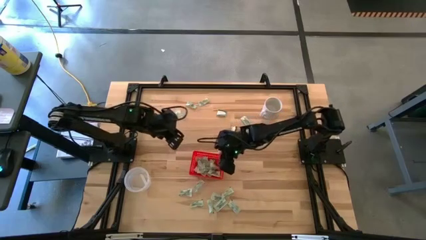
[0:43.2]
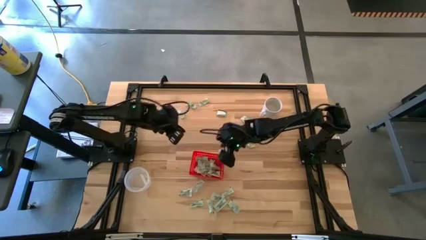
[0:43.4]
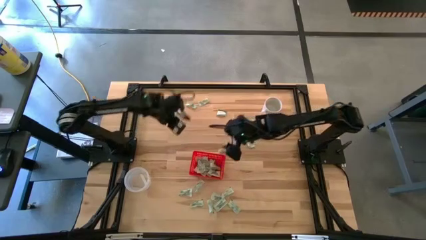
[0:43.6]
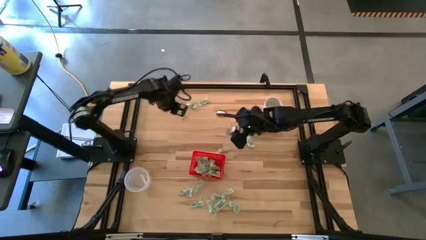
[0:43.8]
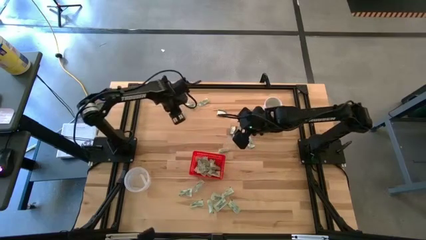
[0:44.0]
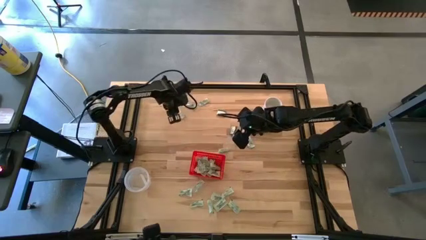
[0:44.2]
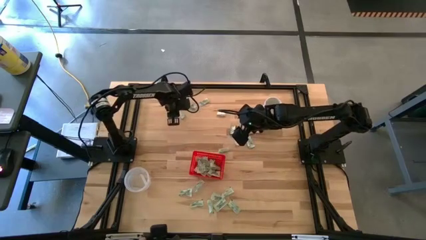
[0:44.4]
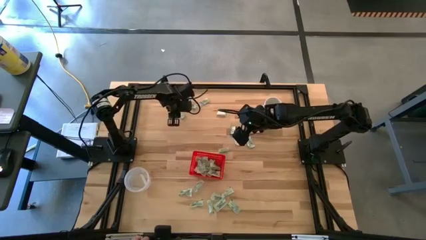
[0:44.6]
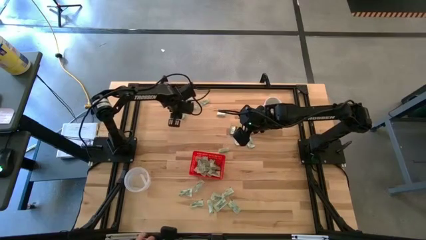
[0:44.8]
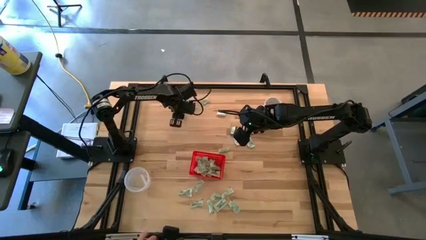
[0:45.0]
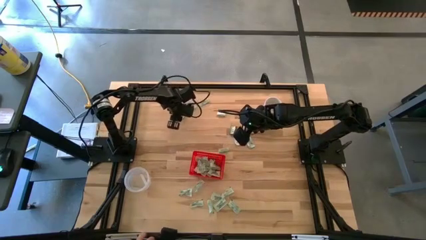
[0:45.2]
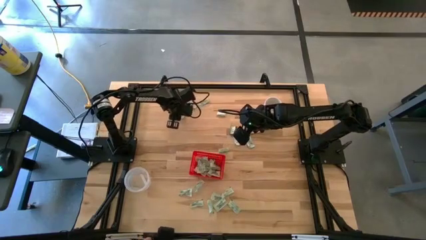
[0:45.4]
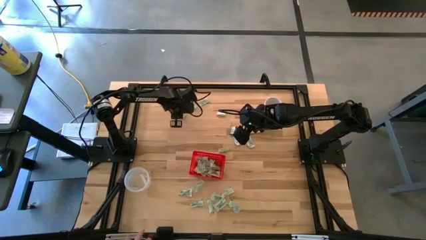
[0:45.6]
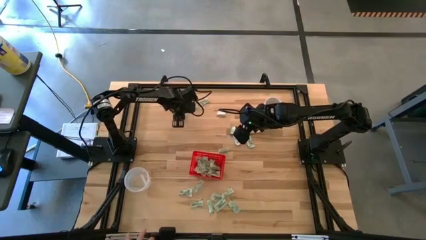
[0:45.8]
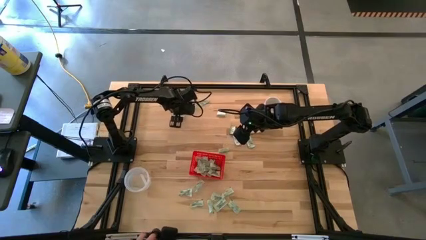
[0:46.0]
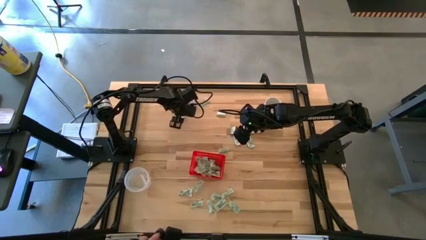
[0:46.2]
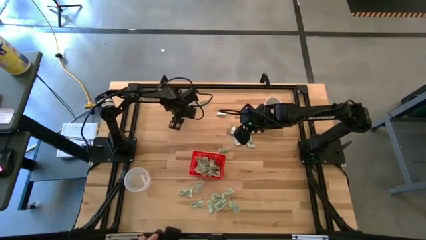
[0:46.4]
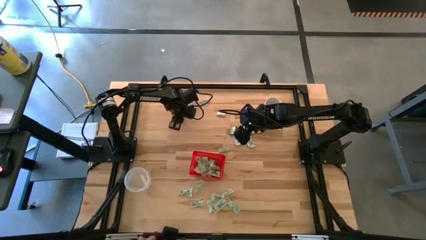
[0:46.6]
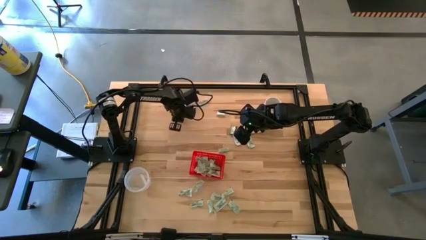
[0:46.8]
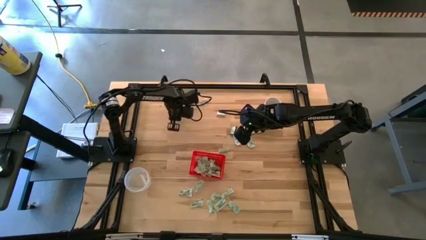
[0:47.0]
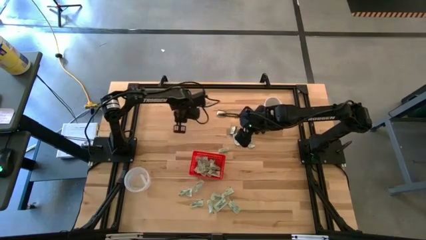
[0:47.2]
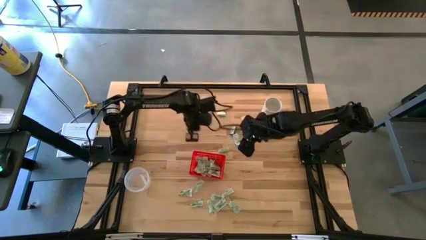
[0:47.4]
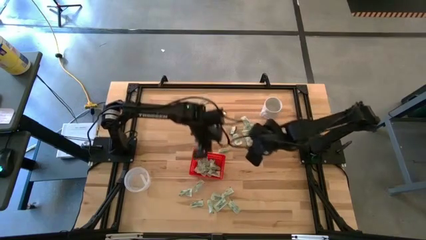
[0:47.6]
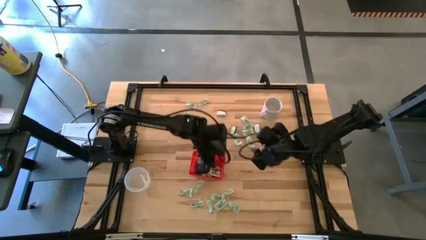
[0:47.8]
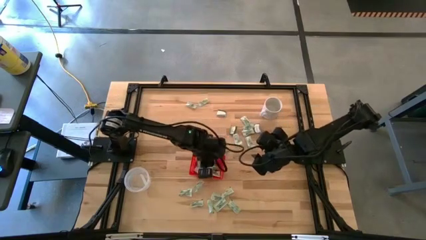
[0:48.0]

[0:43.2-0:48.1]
Task: Pick and place Stevia / Truvia into bins
Put the green stevia packet into the red basket

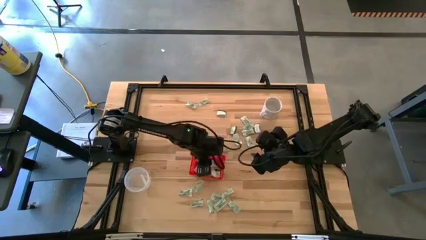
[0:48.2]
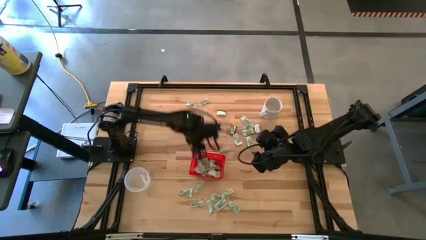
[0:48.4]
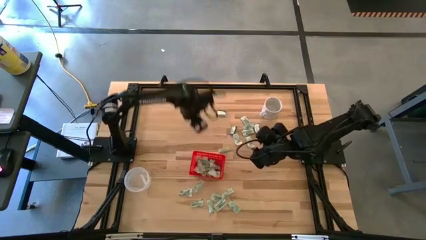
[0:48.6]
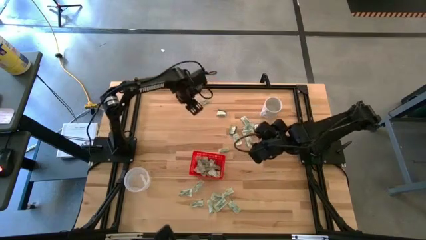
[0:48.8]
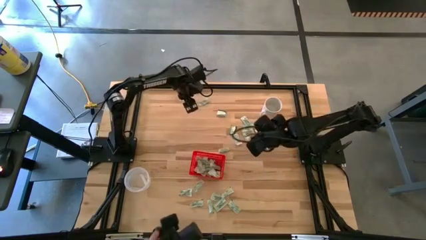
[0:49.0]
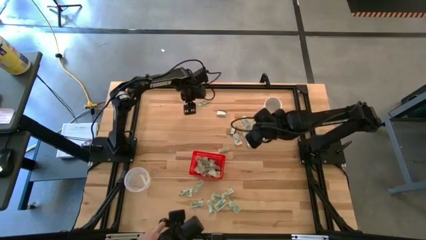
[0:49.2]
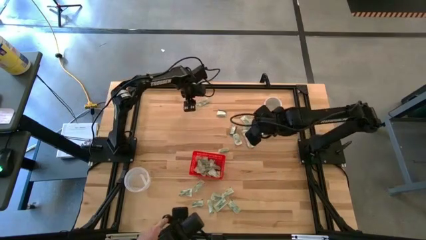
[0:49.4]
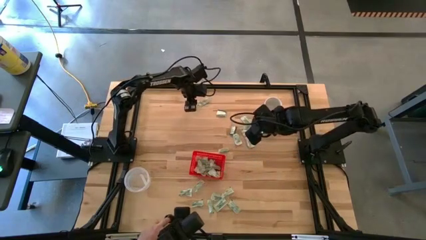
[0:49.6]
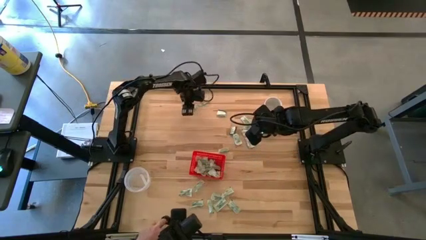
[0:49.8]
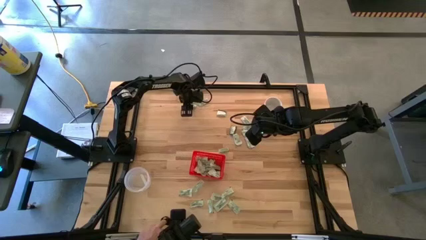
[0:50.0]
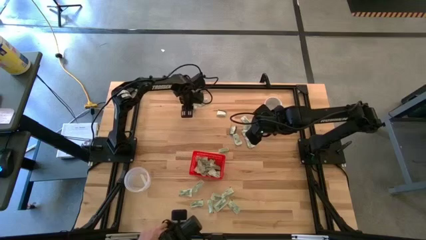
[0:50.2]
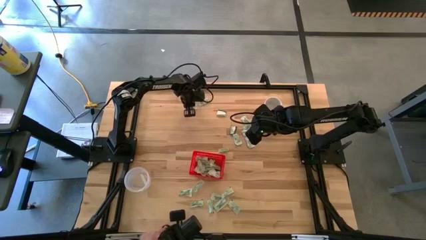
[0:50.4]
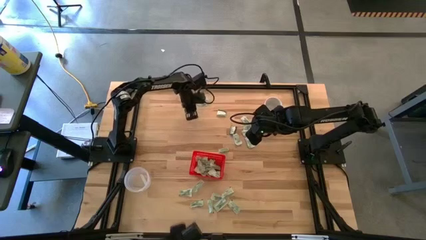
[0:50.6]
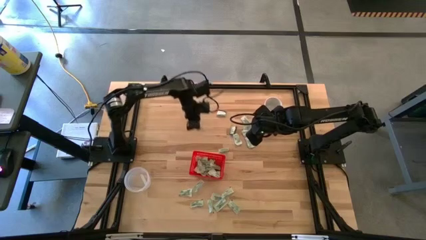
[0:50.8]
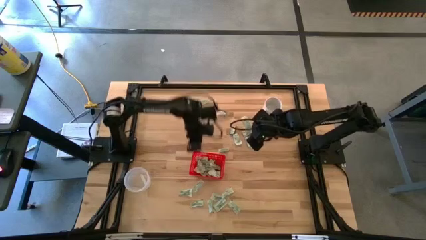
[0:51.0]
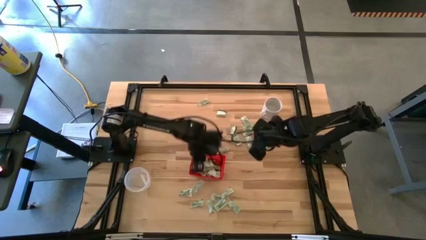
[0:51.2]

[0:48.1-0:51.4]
Put the green stevia packet into the red basket

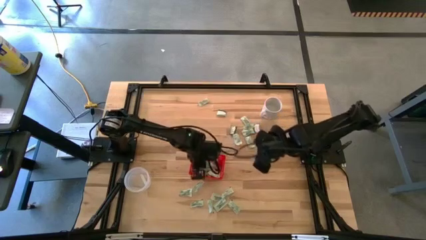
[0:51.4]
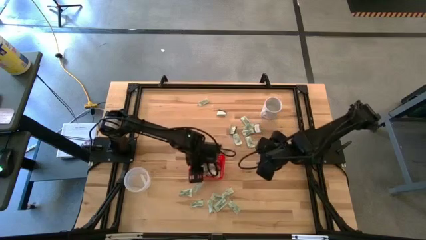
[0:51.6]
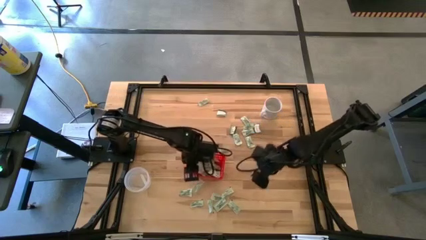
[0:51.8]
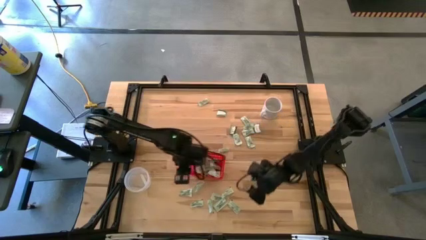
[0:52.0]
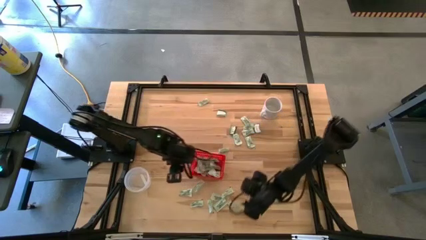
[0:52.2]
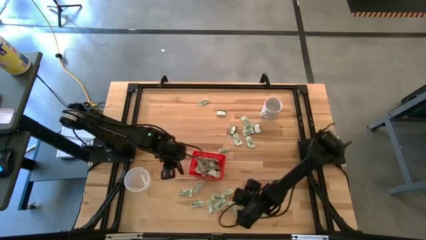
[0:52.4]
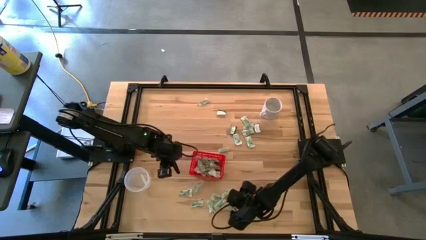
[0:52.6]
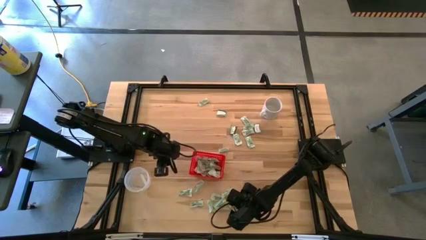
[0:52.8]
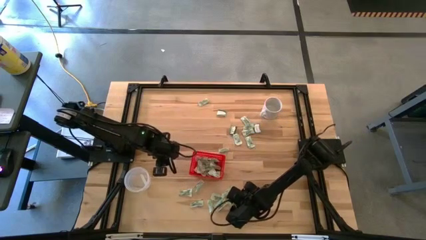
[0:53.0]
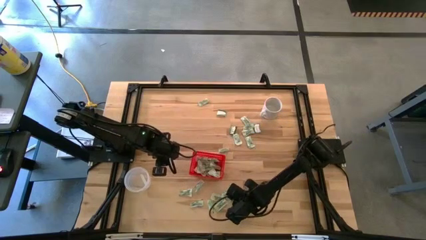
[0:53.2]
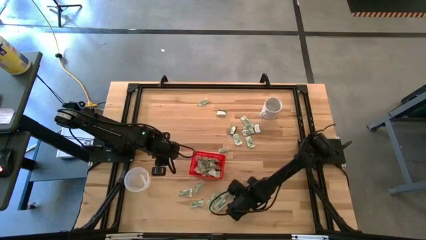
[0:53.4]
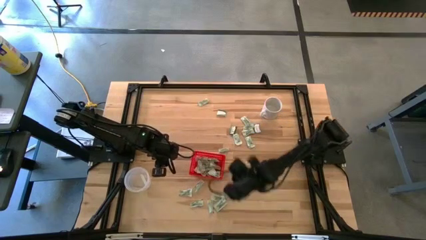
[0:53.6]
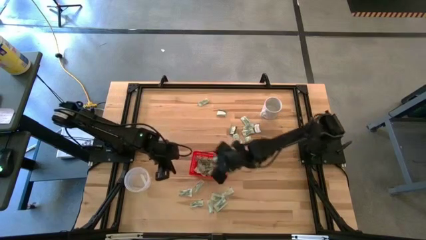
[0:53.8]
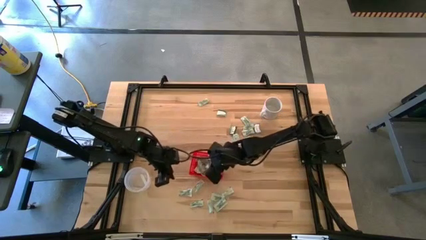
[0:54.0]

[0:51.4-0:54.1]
Put the green stevia packet into the red basket

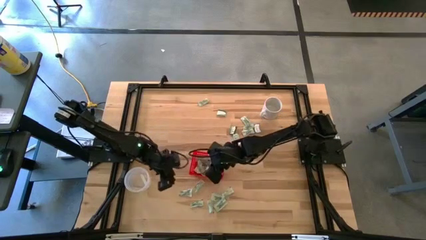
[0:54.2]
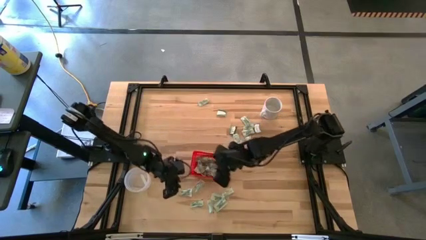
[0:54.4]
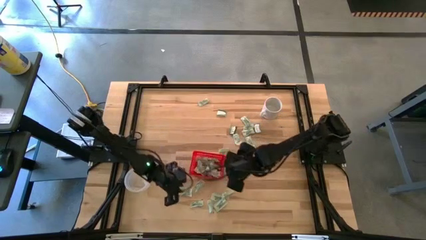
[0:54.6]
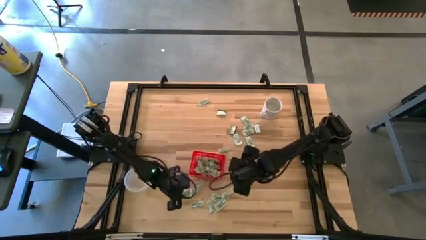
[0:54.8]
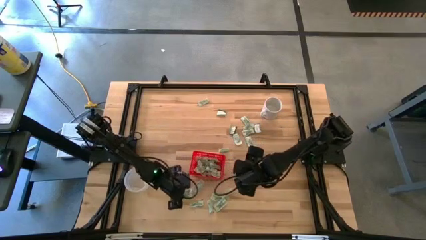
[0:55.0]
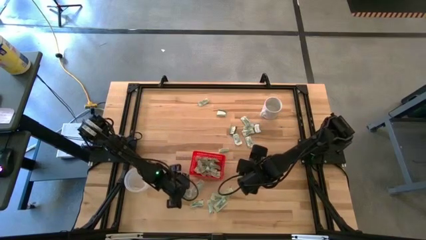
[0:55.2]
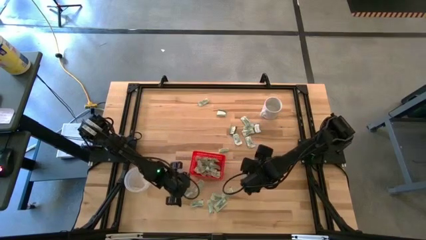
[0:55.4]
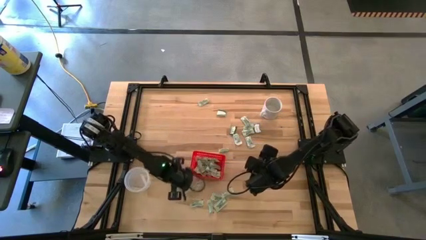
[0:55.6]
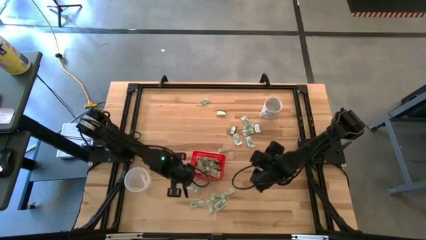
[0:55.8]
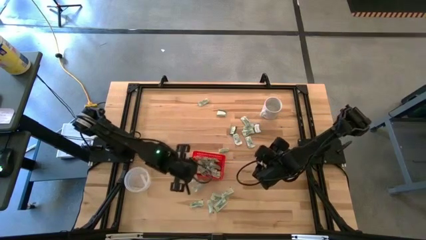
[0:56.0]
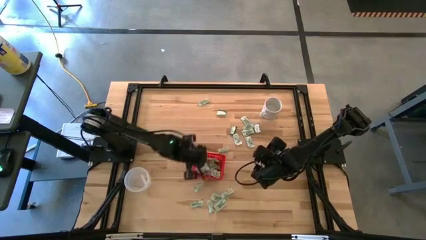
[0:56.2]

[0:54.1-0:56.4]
Put the green stevia packet into the red basket

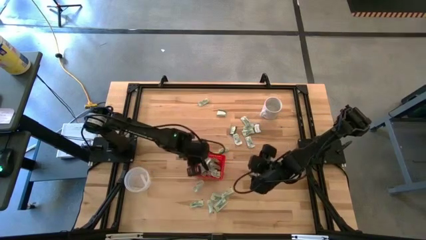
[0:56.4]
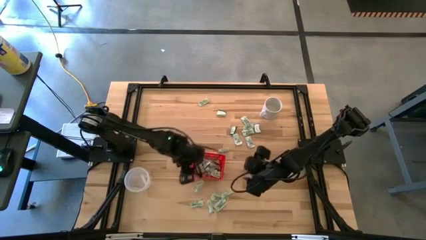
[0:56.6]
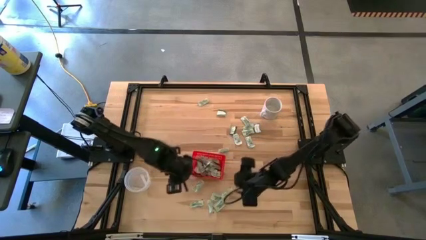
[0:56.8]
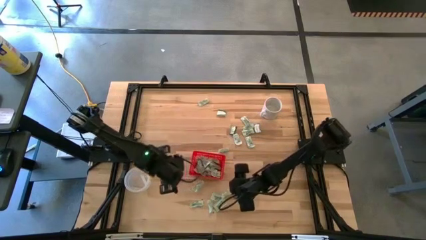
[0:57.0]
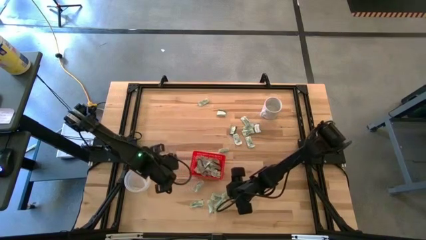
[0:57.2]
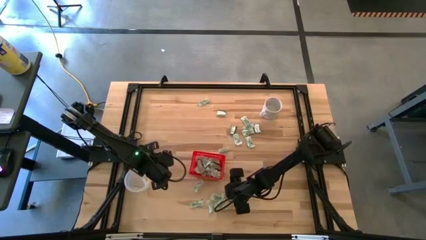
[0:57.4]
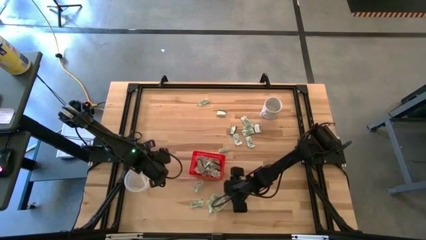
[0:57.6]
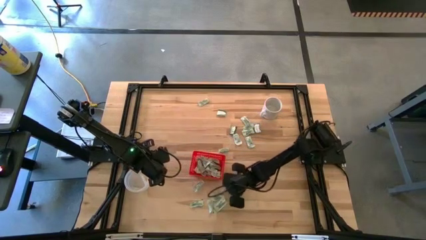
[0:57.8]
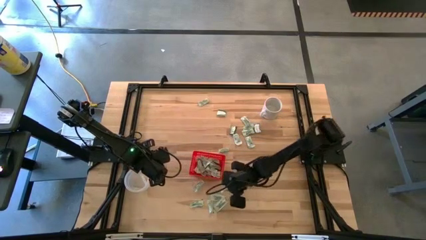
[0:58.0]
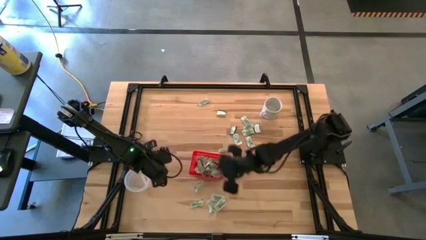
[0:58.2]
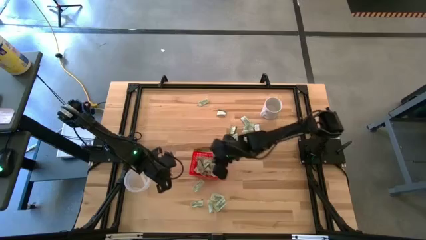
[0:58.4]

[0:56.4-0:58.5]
Put the green stevia packet into the red basket

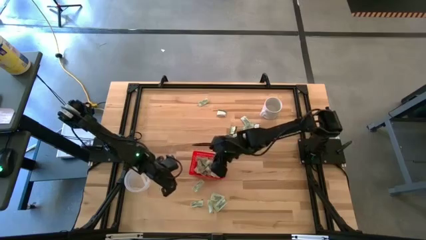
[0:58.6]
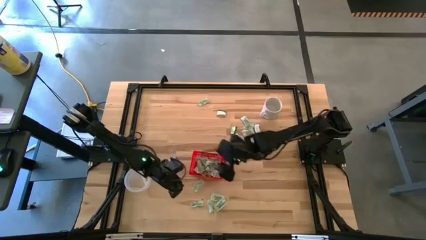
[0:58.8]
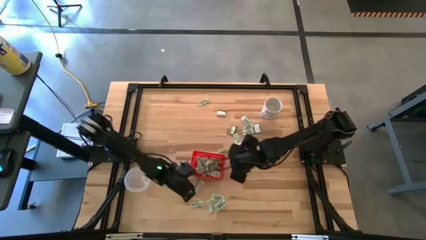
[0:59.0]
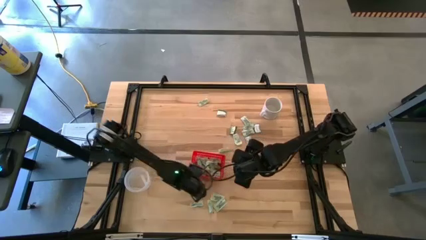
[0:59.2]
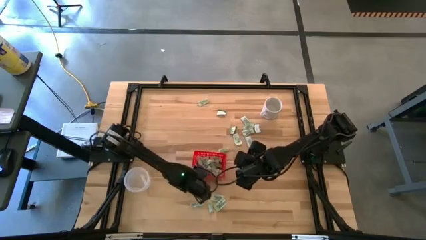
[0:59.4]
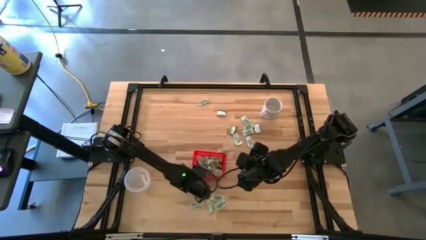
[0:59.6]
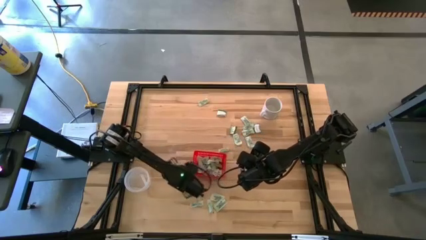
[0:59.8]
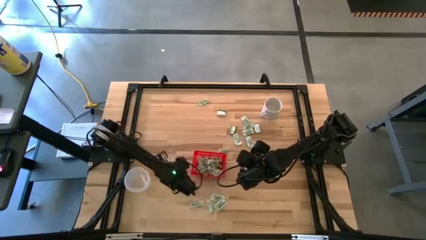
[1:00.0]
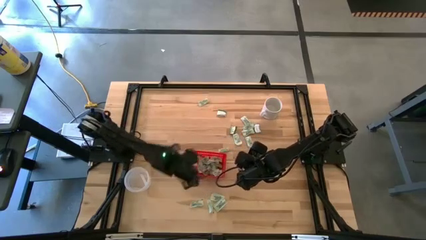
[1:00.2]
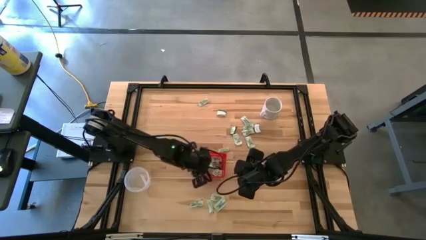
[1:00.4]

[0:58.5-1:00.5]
Put the green stevia packet into the red basket
